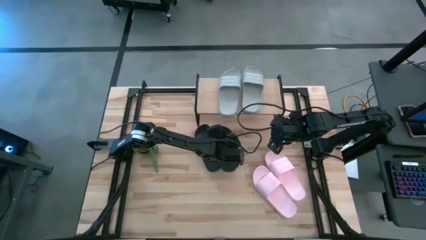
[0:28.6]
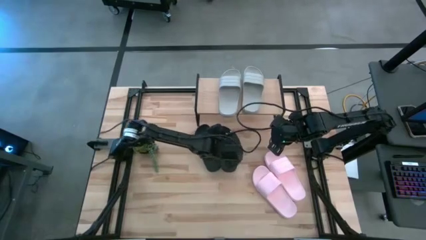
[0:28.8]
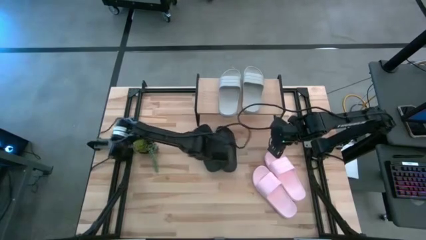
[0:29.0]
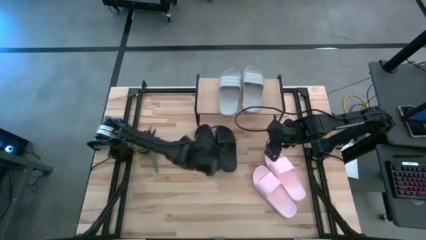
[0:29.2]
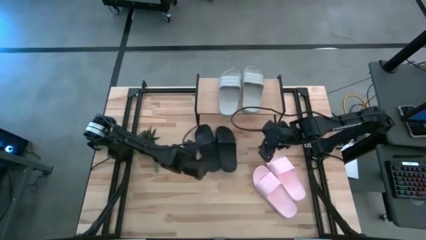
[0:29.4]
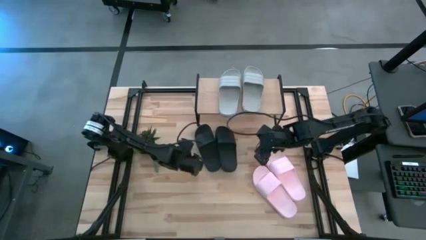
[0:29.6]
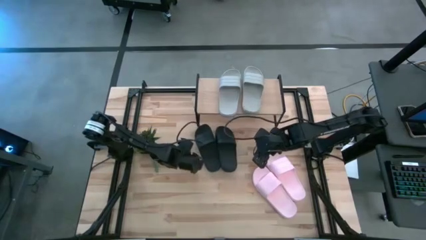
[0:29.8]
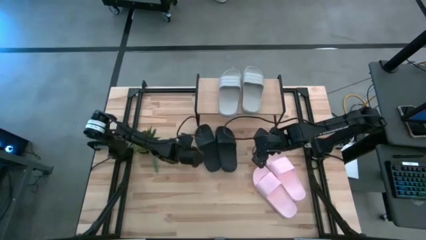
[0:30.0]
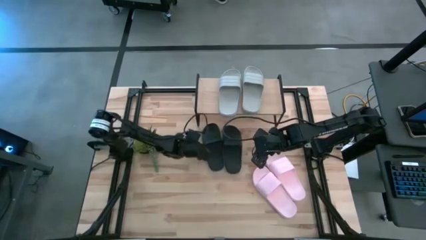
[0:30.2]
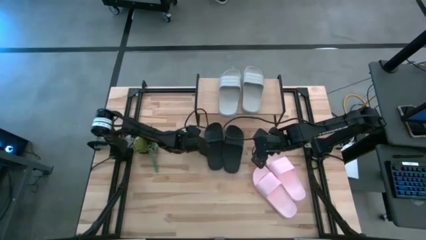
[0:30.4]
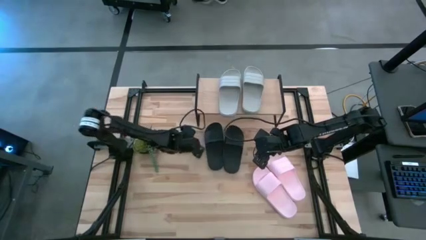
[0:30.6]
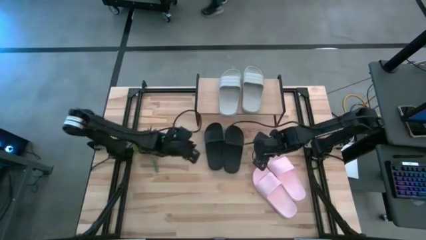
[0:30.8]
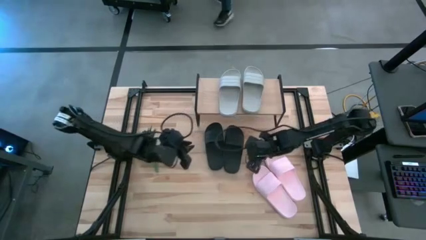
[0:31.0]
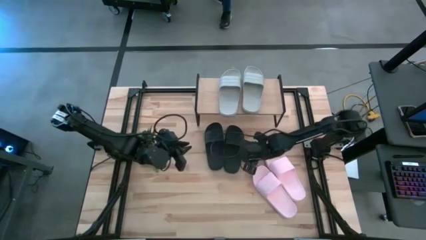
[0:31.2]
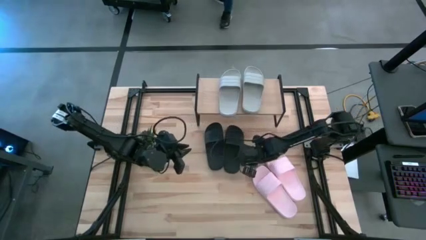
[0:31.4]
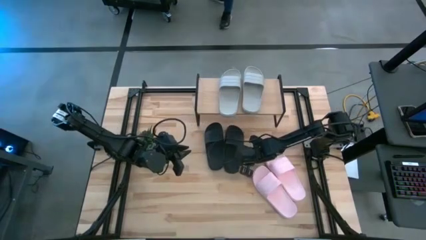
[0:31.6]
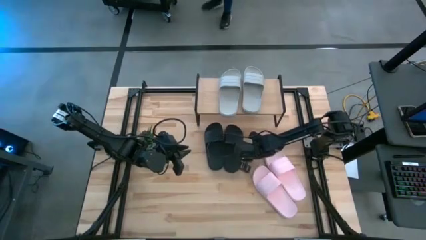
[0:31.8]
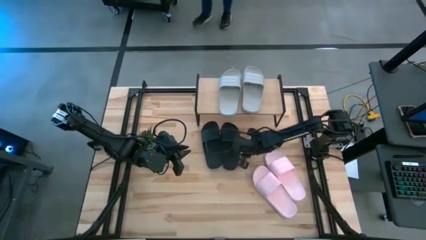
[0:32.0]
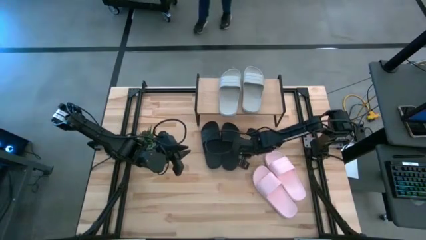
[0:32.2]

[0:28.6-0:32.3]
Task: Pick and place slides into the shelf
Adjust the black slippers under the shelf

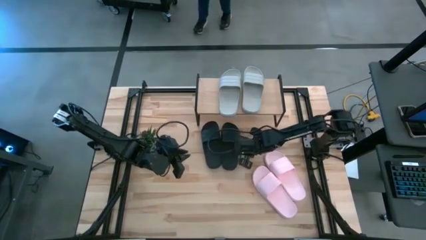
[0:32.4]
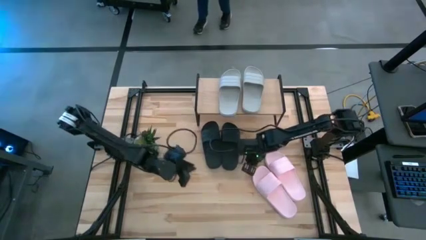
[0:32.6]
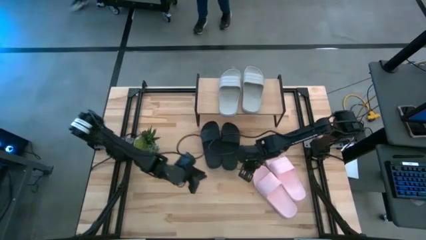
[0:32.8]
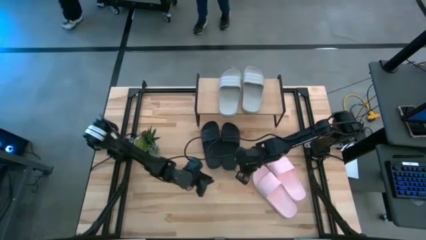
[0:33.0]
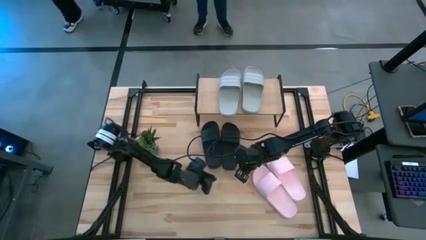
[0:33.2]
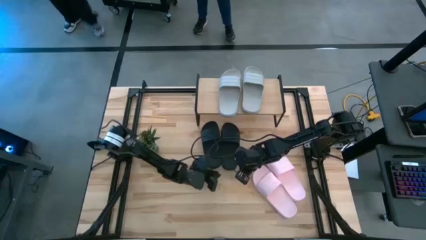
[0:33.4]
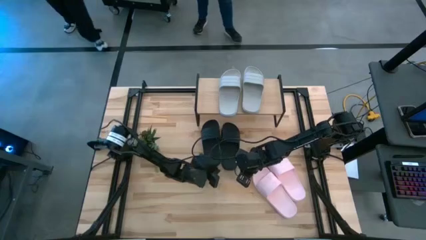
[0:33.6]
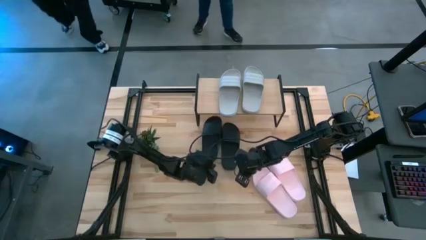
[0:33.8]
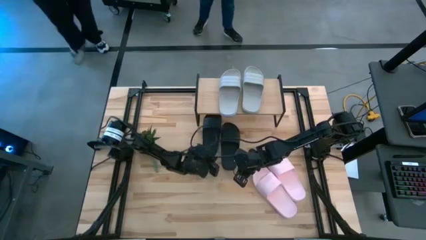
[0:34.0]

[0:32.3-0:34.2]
Adjust the black left slipper under the shelf

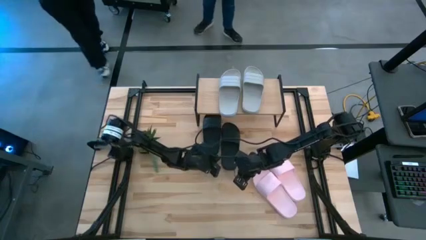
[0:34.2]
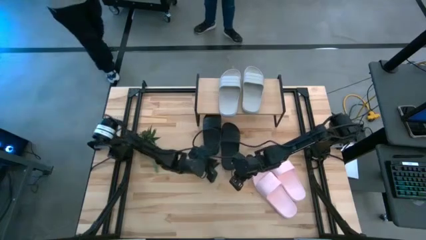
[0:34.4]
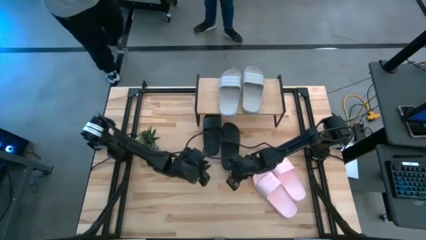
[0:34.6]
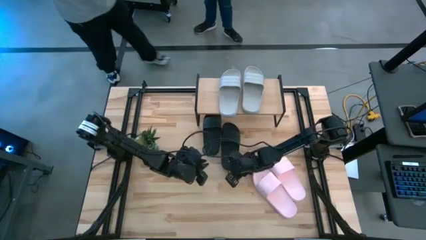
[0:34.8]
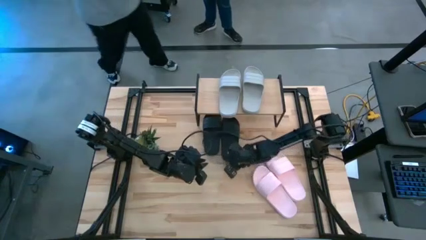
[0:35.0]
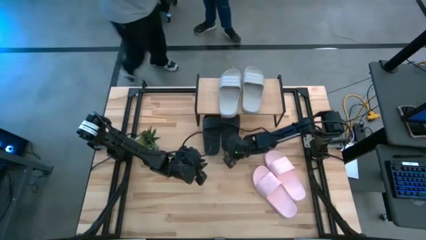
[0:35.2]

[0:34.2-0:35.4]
Adjust the black right slipper under the shelf

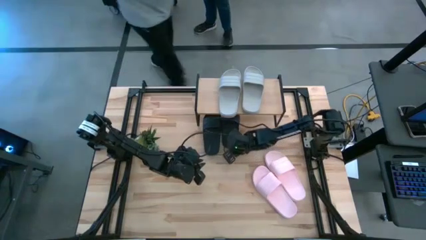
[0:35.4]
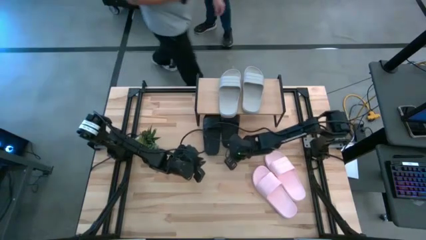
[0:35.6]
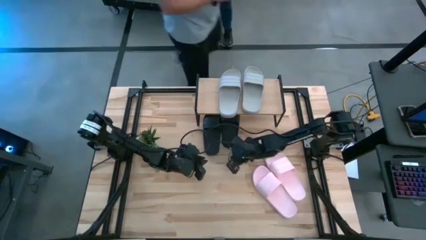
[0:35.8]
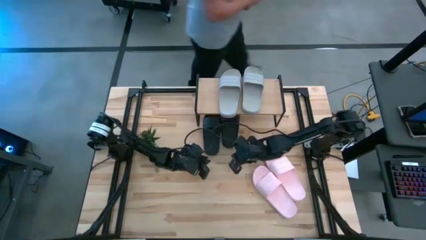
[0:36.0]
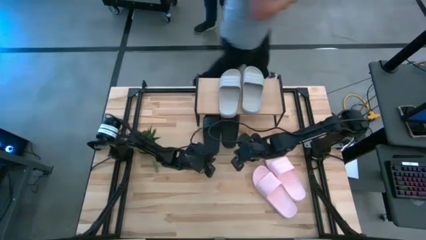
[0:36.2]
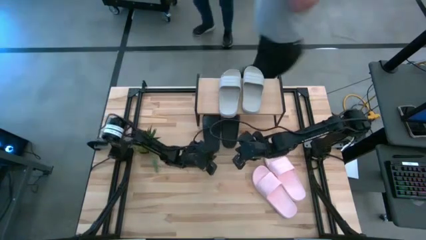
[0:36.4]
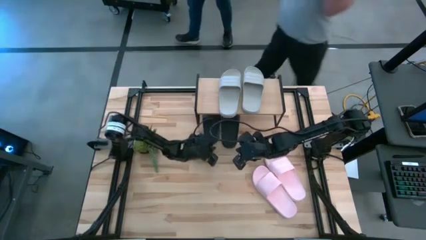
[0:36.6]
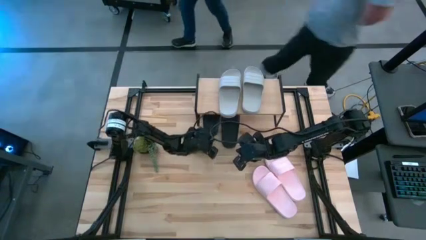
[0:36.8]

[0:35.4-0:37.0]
Adjust the black left slipper under the shelf

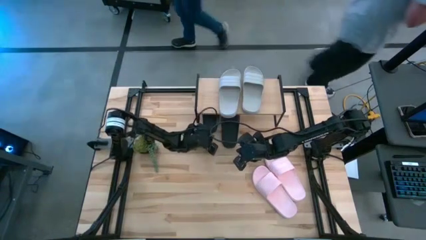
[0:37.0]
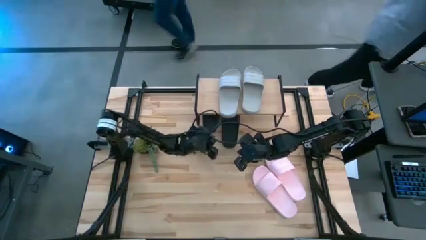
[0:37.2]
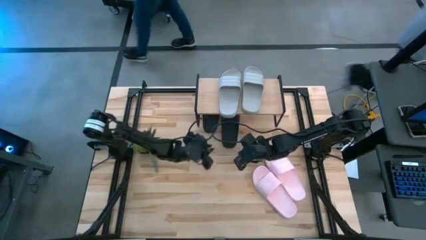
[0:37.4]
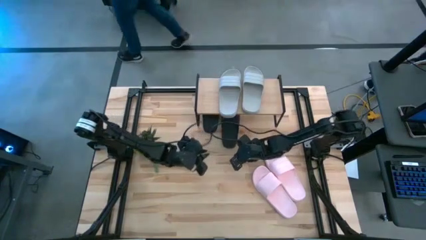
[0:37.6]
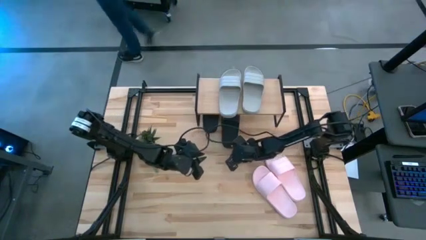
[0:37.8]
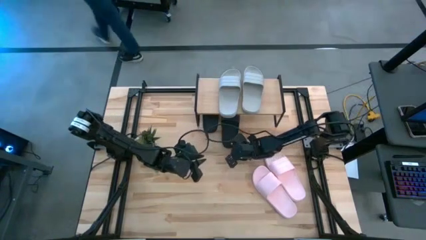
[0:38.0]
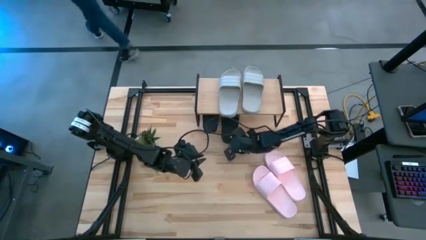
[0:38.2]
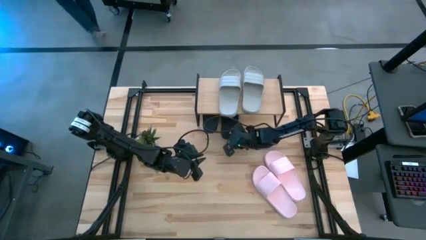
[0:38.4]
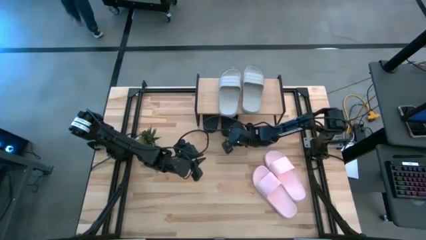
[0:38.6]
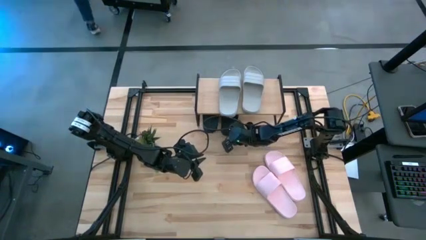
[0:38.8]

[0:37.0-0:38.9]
Adjust the black right slipper under the shelf

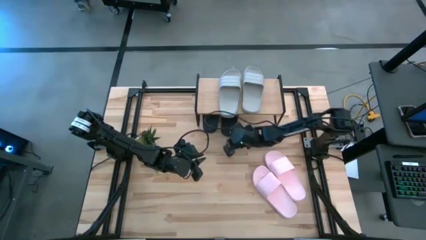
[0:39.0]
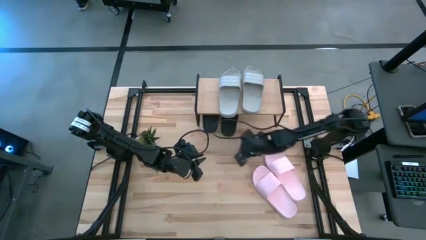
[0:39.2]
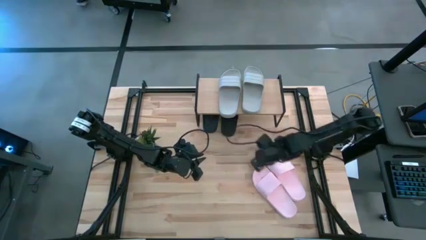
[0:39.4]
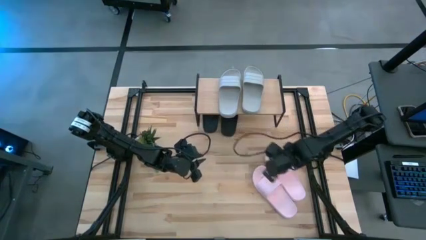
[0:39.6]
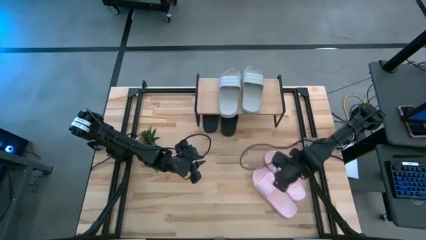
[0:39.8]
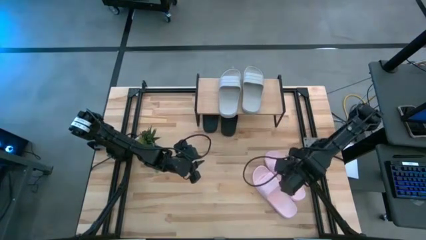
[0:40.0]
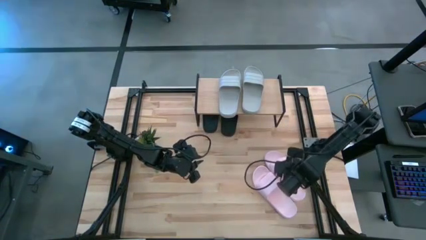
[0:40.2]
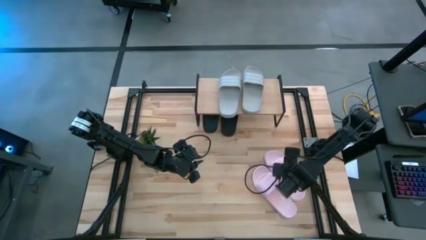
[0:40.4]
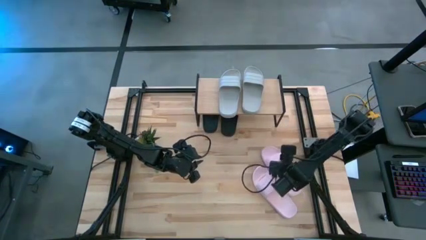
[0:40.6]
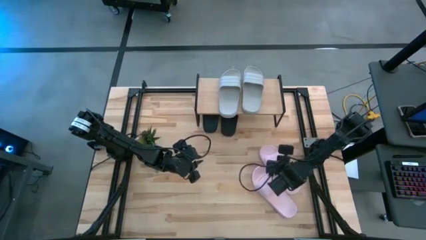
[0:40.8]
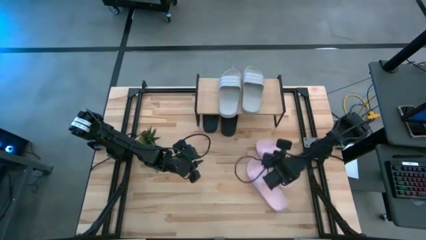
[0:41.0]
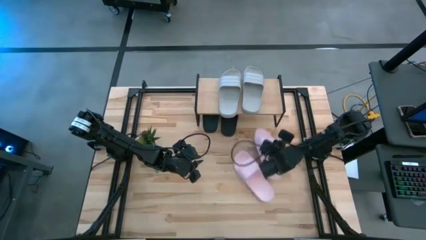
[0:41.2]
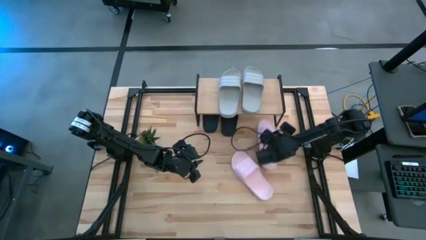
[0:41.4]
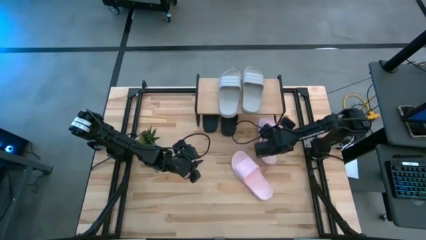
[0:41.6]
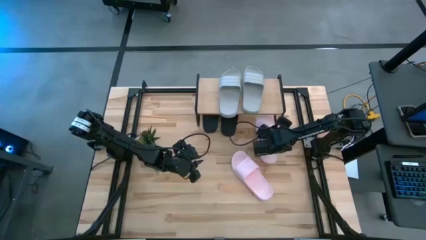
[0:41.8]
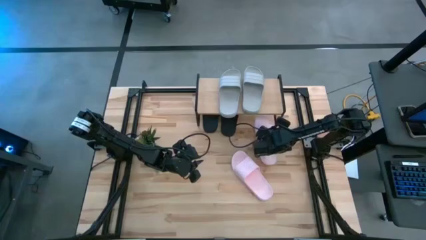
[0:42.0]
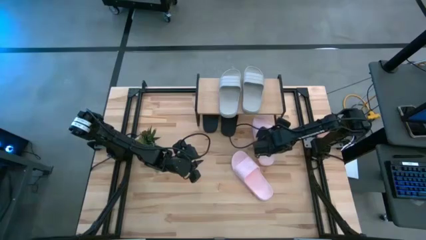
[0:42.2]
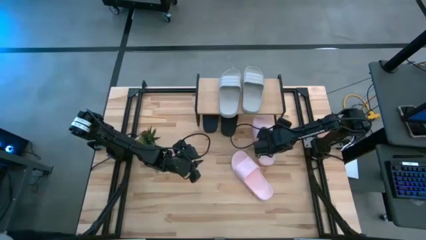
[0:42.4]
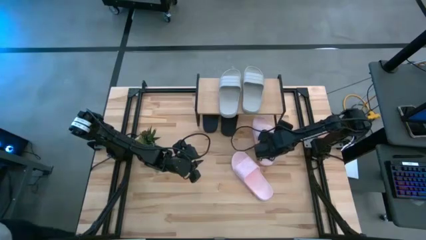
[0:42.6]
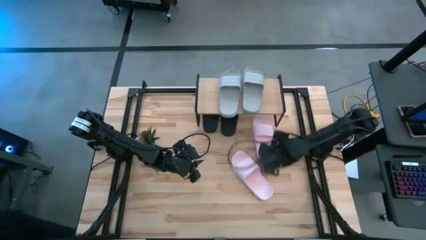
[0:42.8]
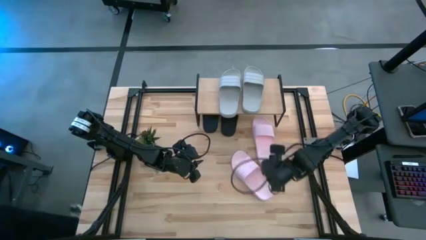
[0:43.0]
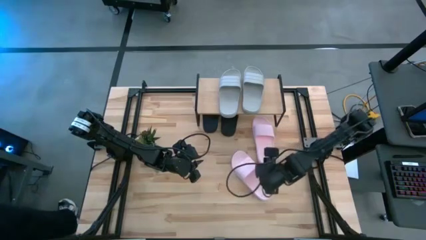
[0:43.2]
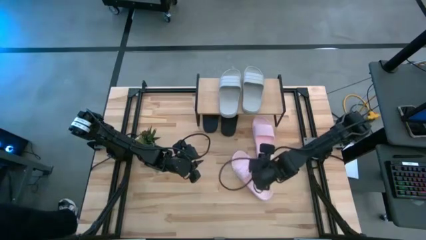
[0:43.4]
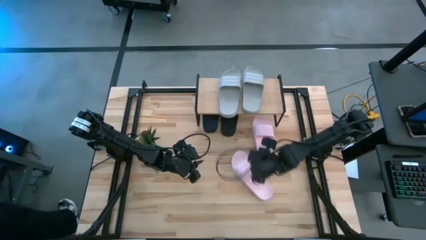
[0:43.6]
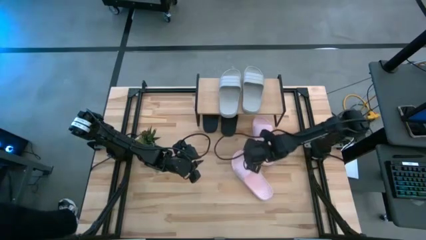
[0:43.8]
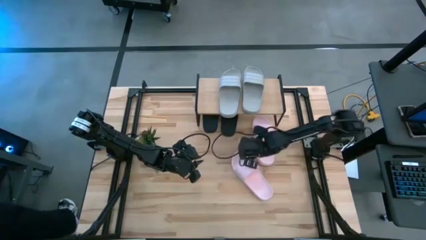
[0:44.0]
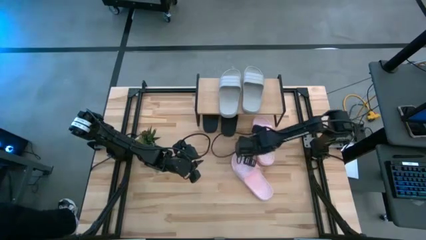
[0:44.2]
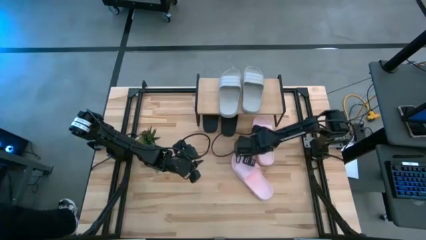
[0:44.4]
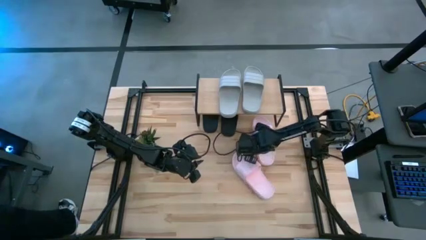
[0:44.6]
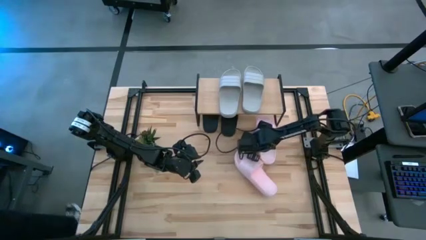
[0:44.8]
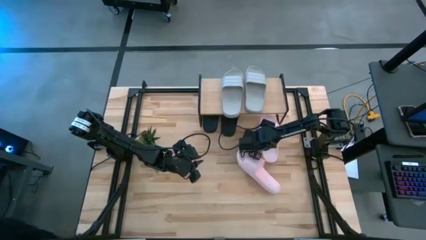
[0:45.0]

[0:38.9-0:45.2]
Move the pink right slipper to the top right of the table
